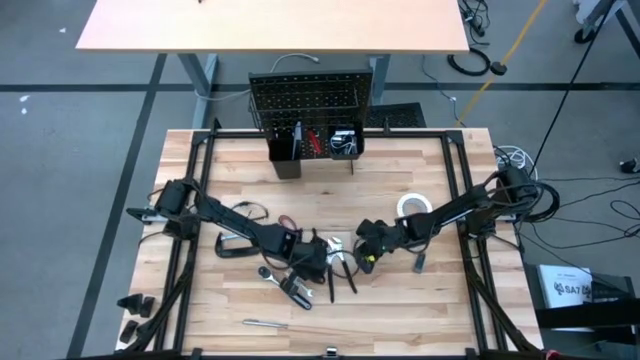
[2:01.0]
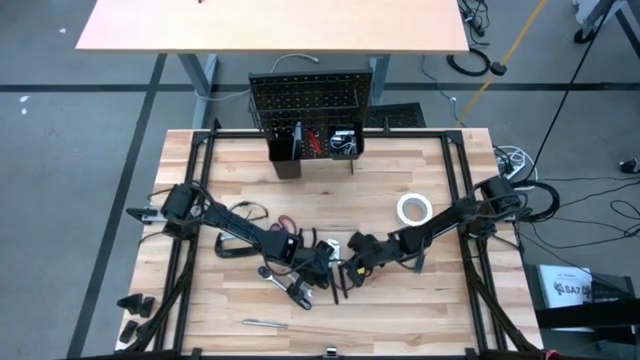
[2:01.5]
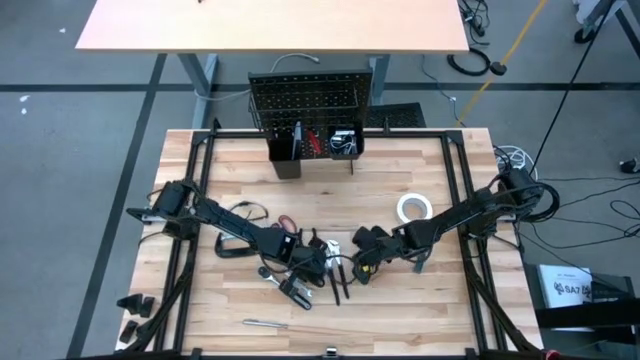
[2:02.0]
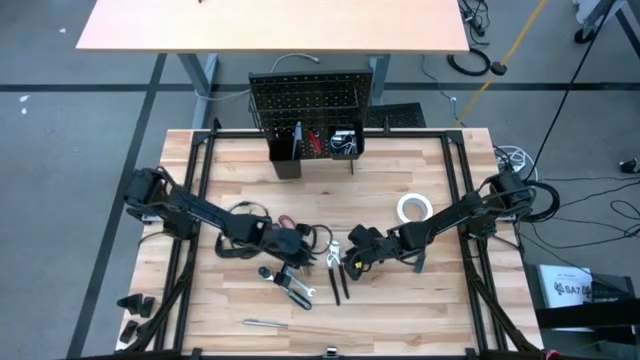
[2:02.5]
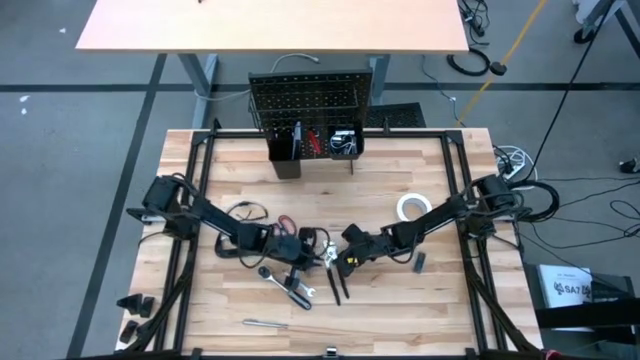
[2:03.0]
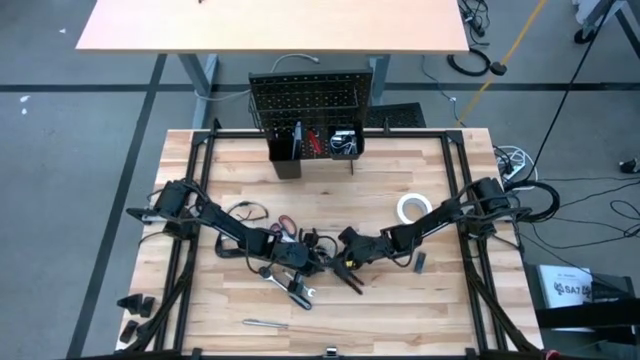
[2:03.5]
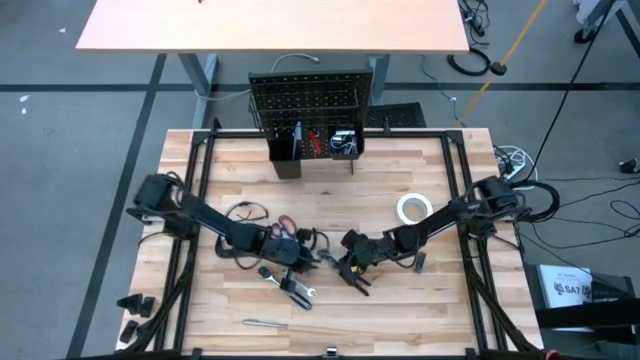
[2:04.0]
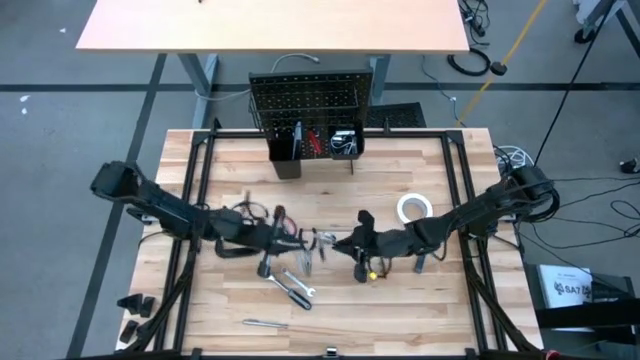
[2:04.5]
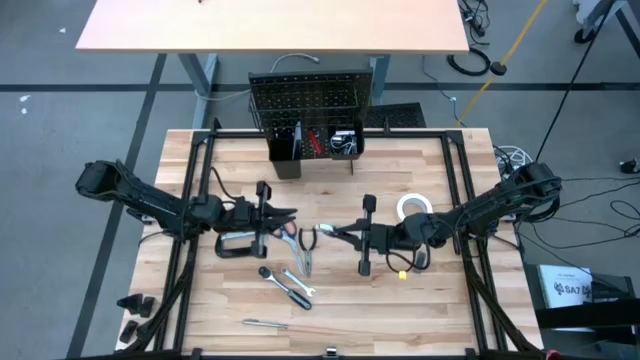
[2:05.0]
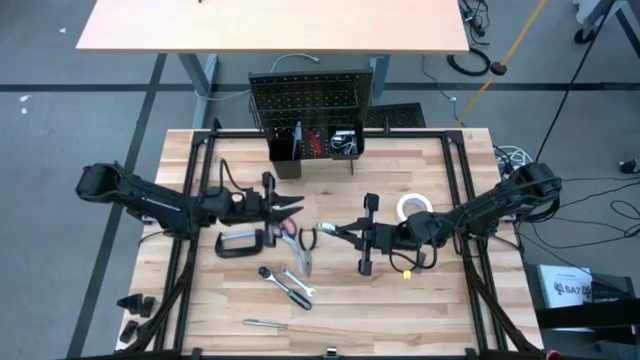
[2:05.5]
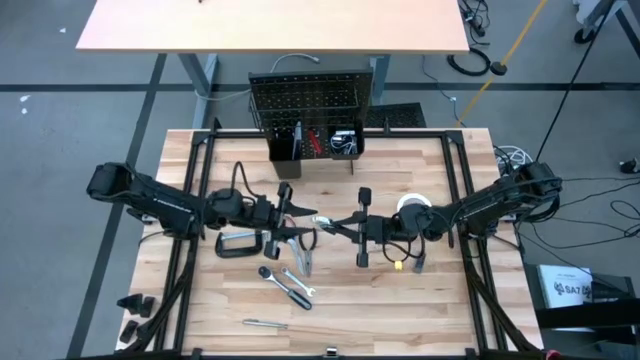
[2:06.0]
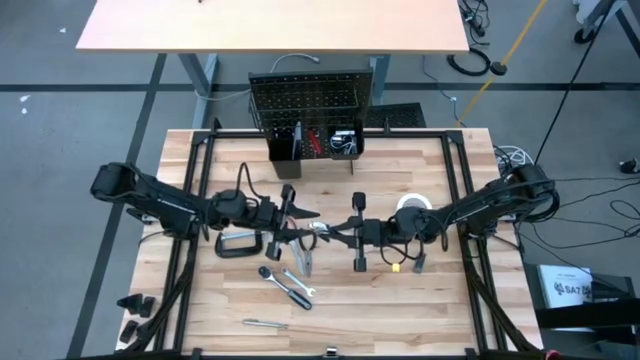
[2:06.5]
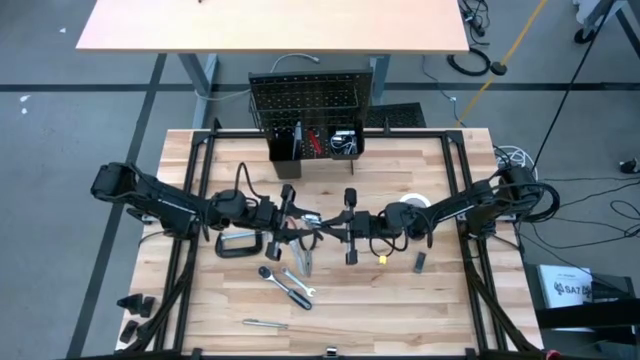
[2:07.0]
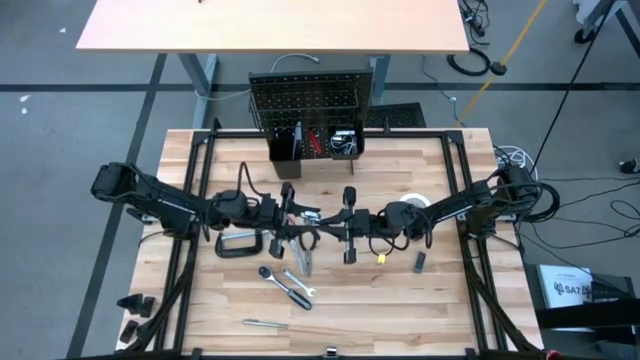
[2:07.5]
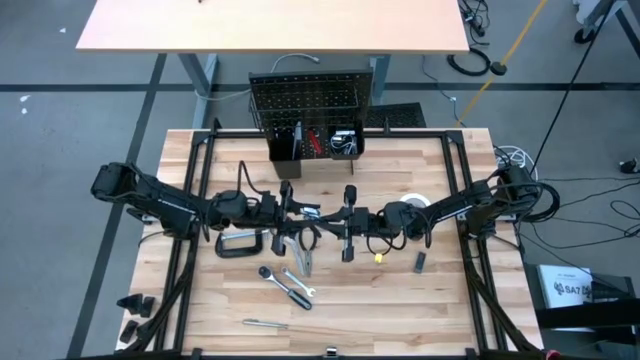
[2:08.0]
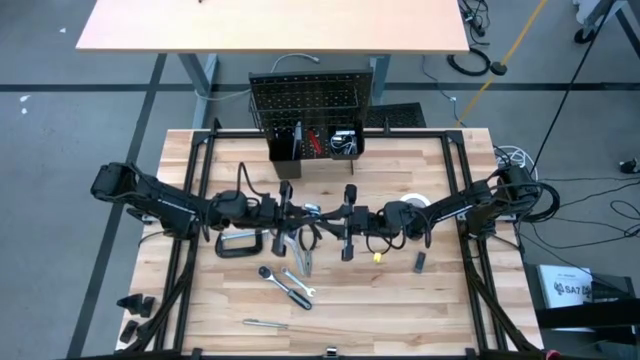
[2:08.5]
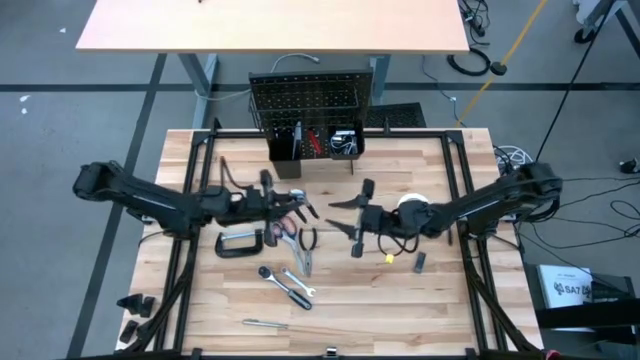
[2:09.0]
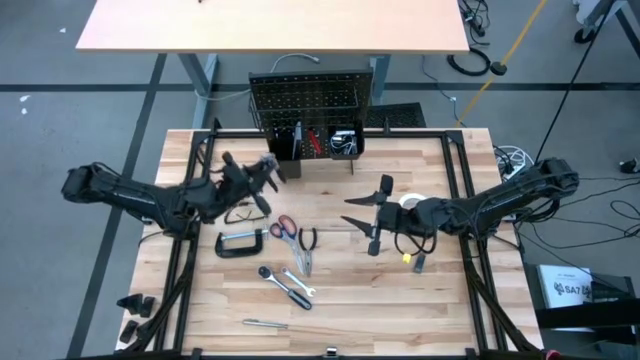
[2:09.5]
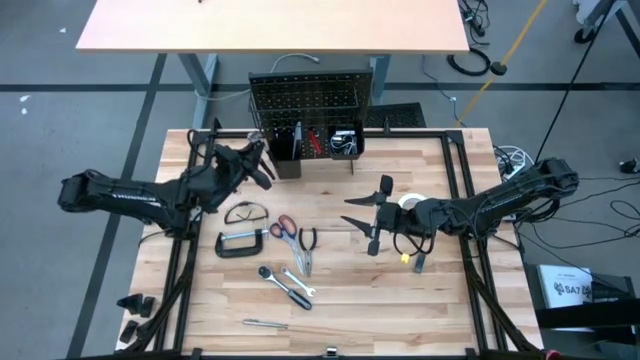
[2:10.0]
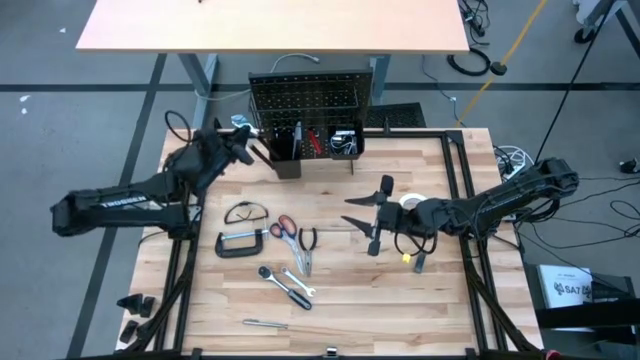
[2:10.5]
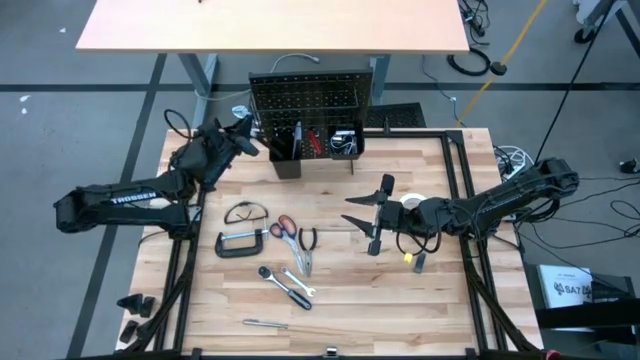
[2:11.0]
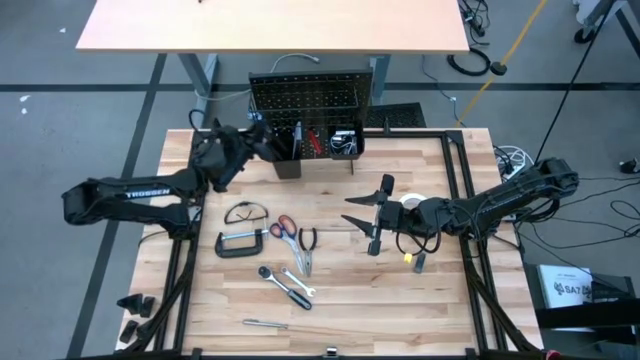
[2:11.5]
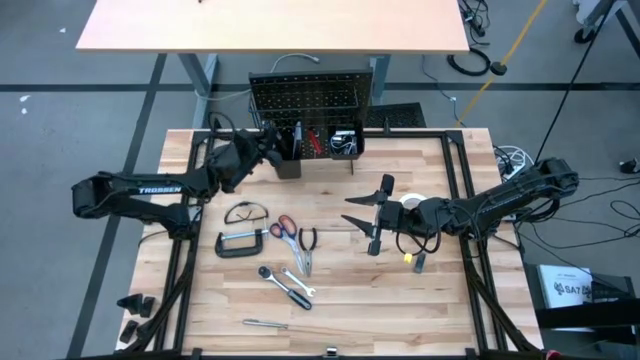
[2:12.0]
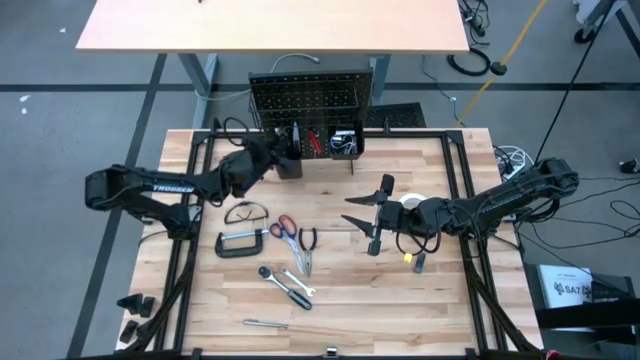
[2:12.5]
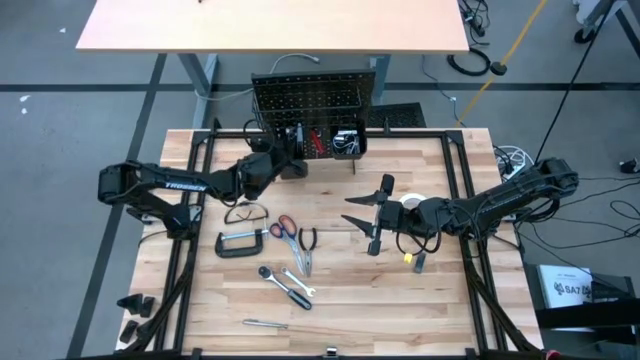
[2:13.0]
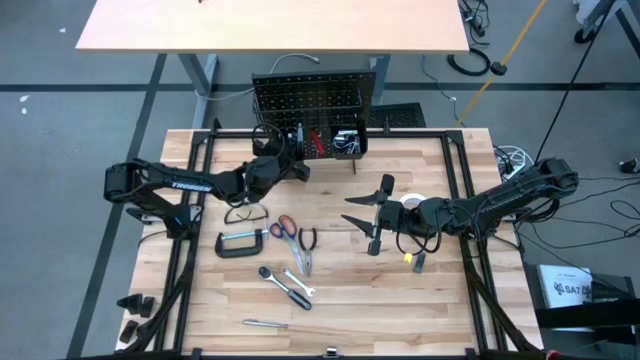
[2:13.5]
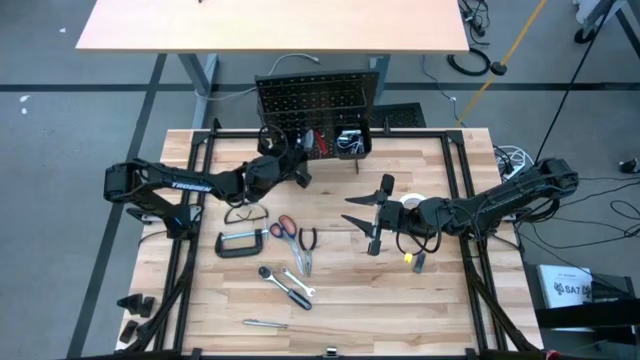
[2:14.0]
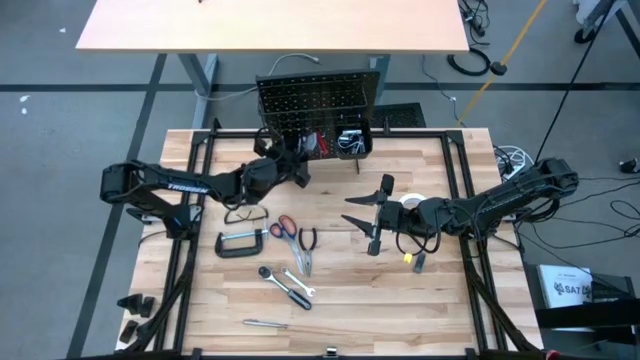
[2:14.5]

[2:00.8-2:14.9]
Task: Hang tools onto peg board
Put the slip joint pliers on the left black bin on the peg board

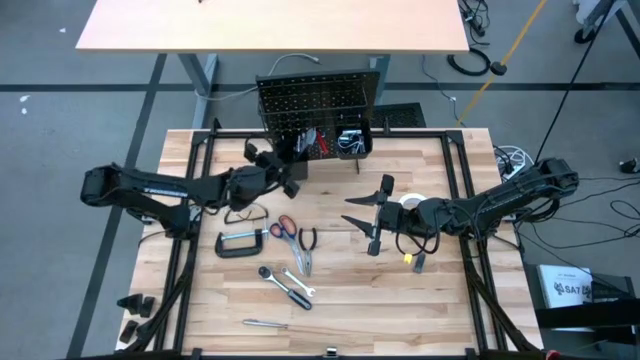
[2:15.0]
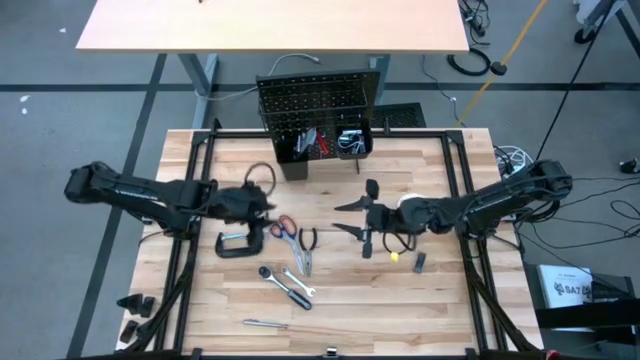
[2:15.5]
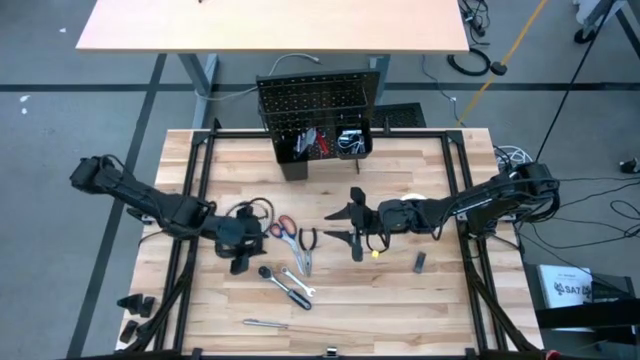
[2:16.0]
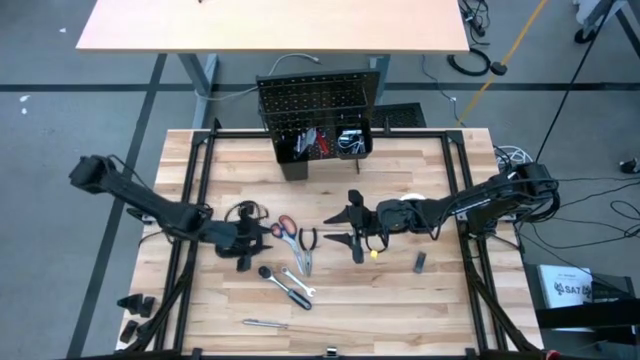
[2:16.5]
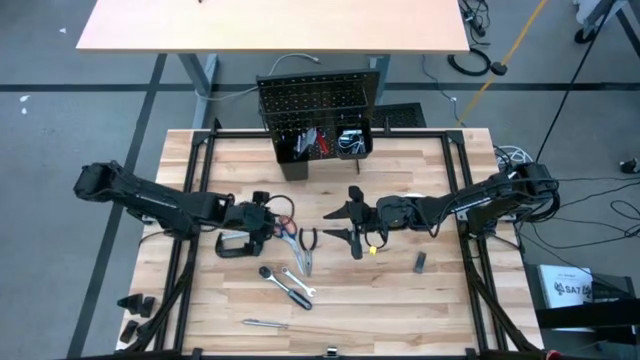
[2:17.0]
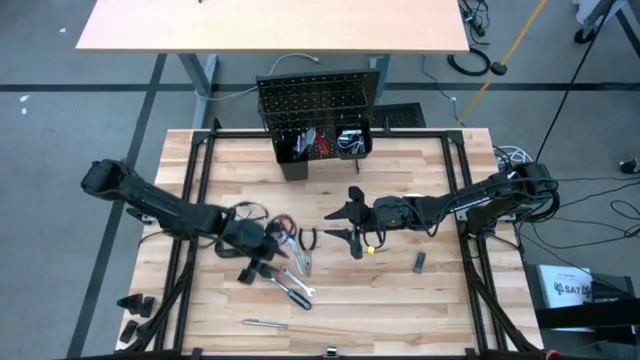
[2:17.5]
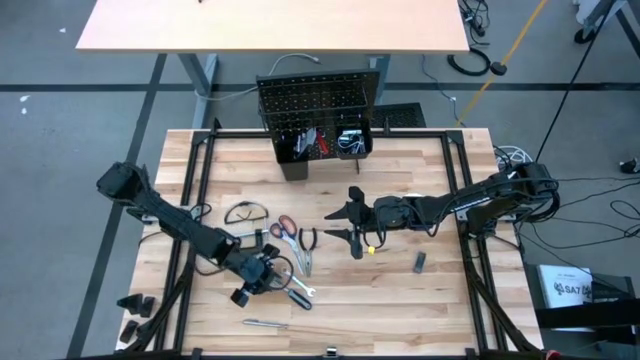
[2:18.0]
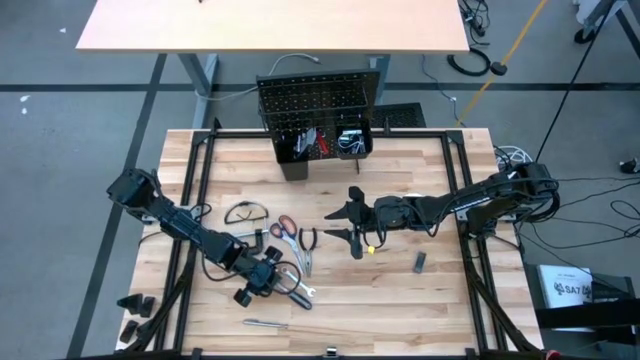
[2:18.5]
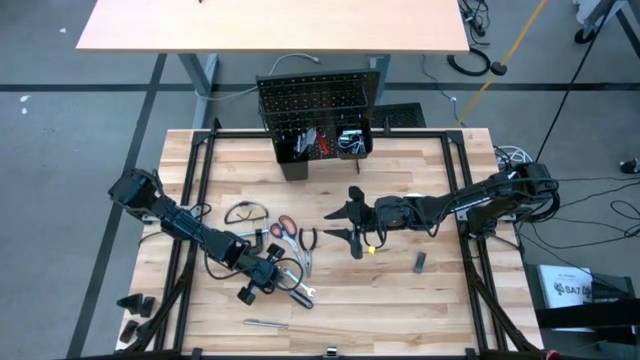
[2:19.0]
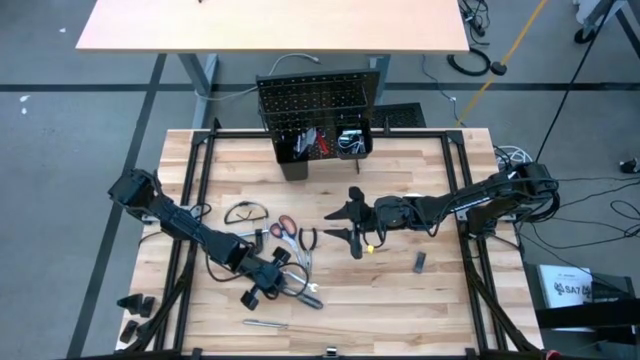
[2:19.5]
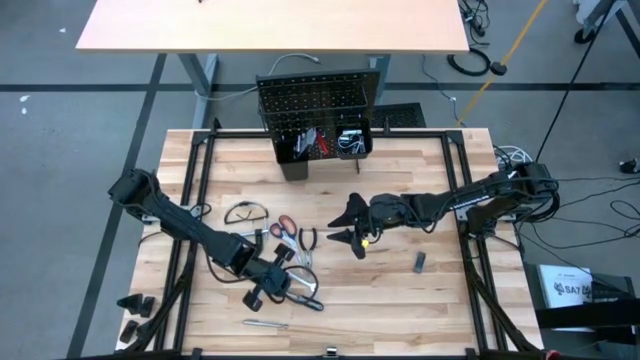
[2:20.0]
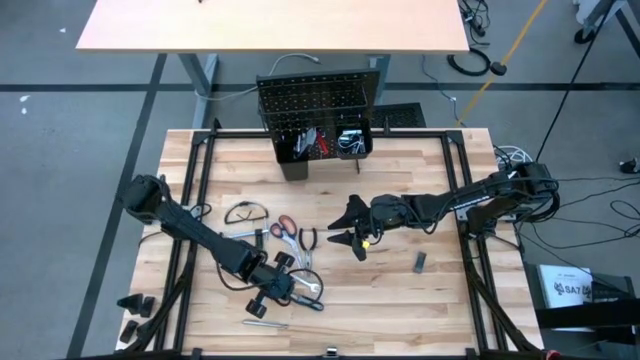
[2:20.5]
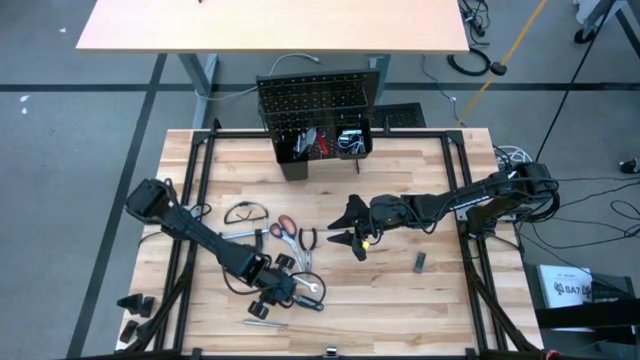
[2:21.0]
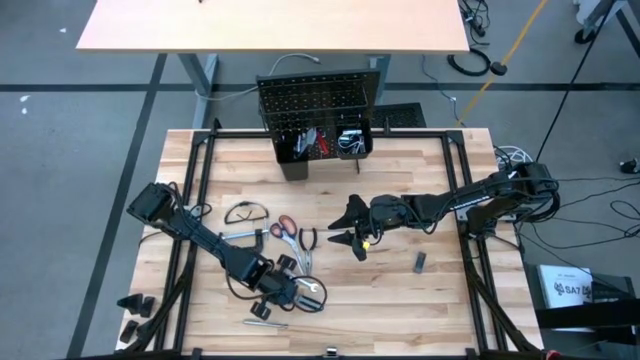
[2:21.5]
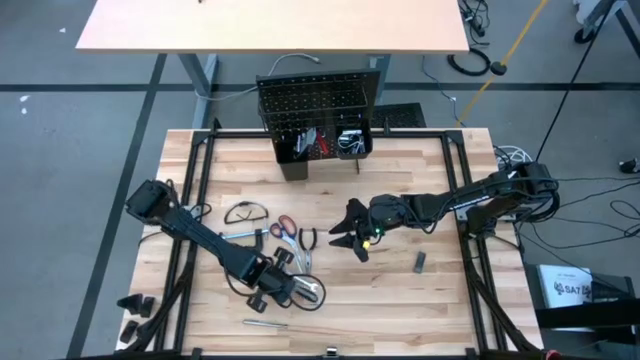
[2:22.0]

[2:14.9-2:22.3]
Put the ratchet wrench on the left black bin on the peg board

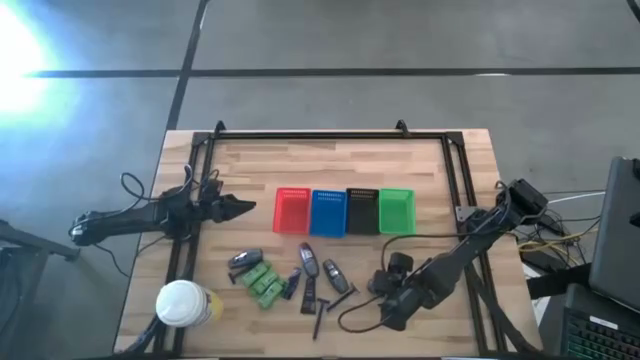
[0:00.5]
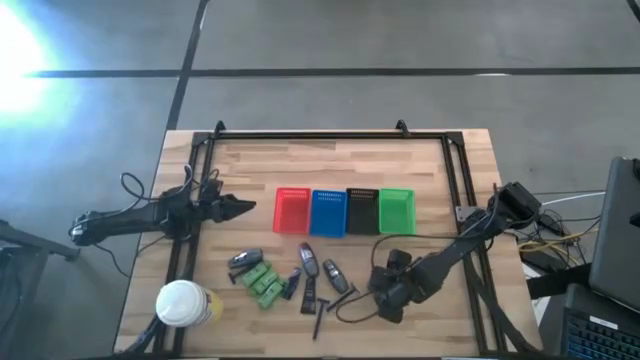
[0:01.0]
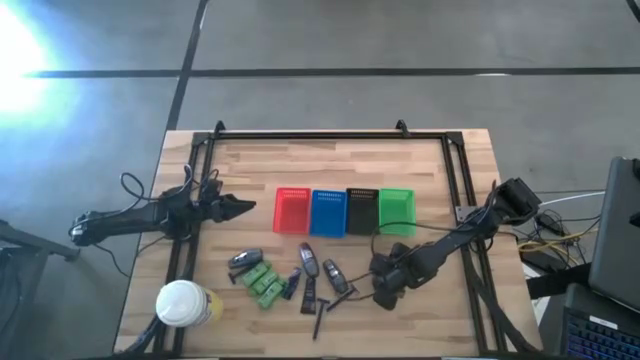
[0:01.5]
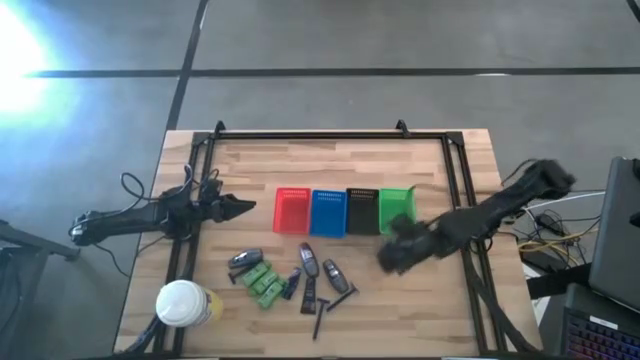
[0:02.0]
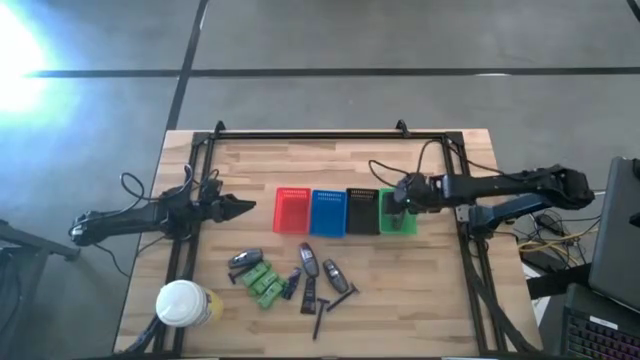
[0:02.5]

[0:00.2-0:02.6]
Task: Pick & Place Travel size toiletries
Put the black deodorant into the green bin
